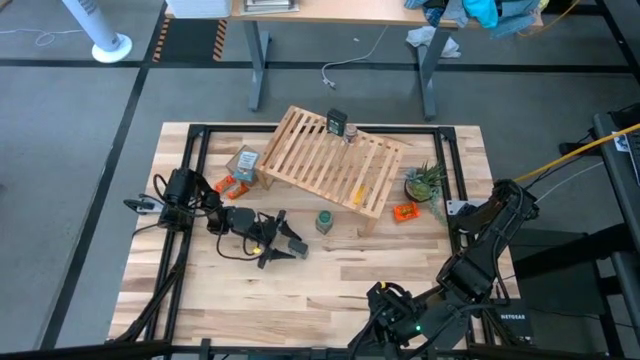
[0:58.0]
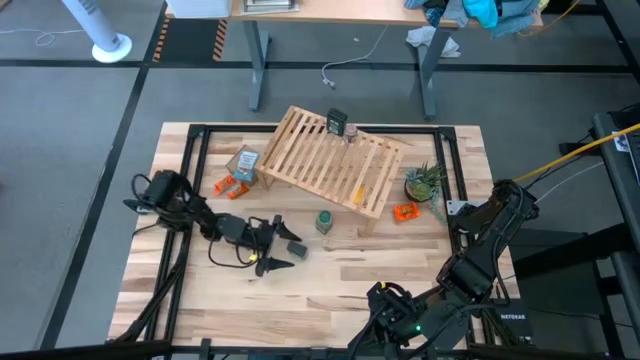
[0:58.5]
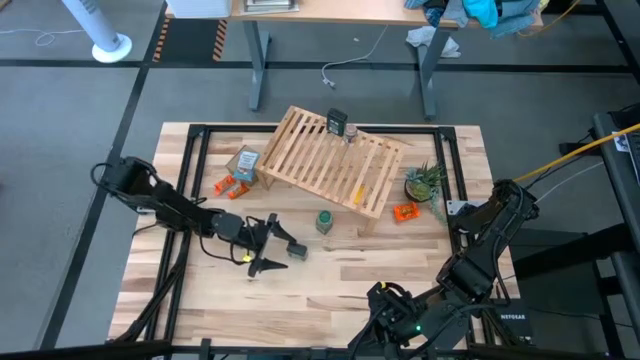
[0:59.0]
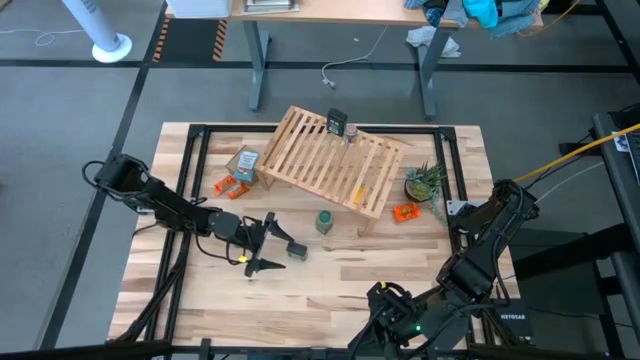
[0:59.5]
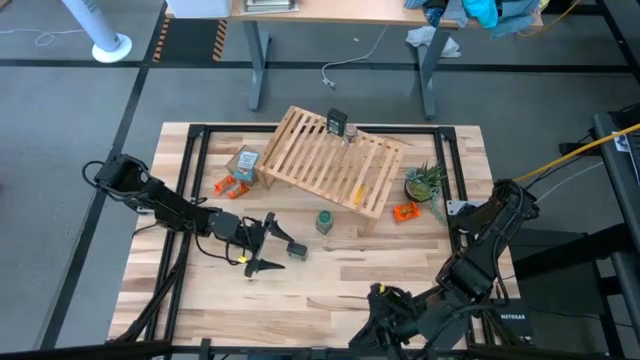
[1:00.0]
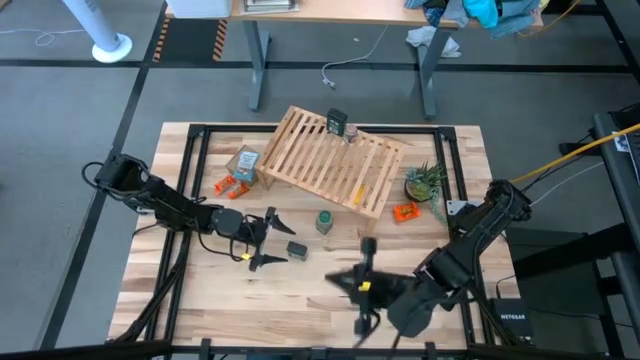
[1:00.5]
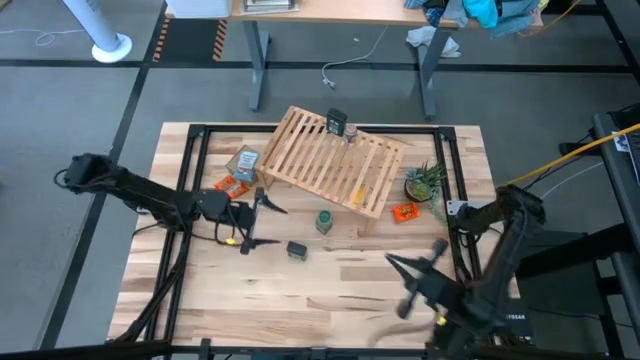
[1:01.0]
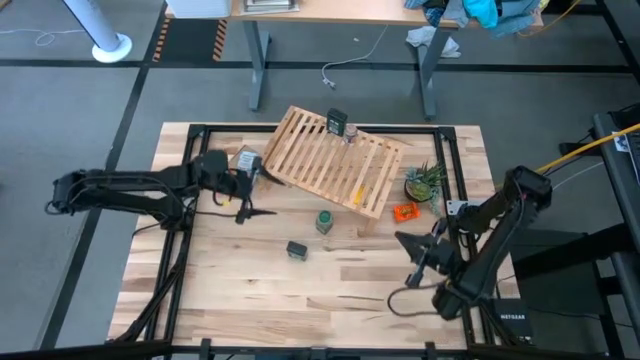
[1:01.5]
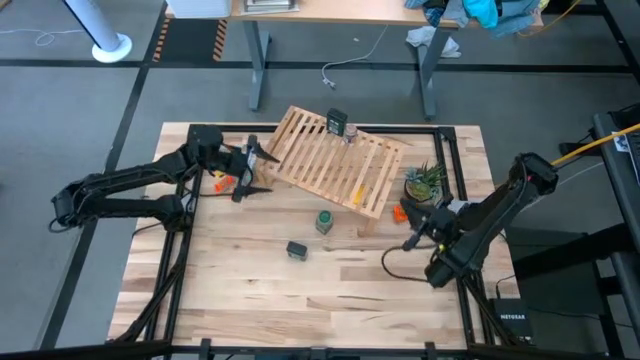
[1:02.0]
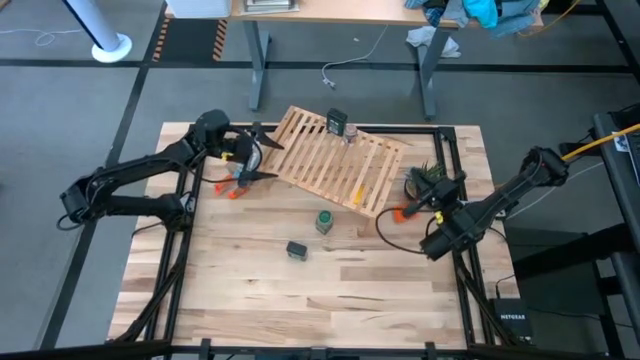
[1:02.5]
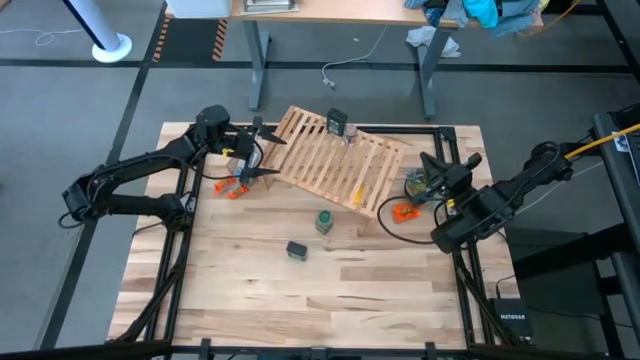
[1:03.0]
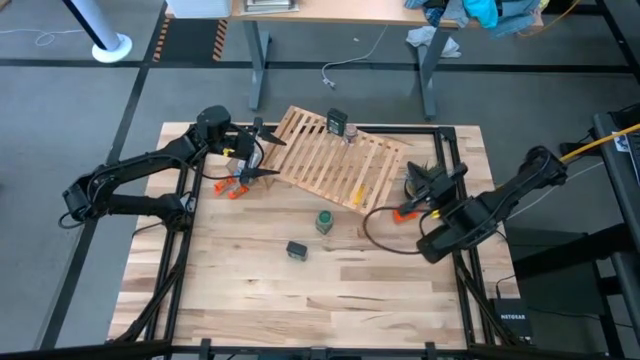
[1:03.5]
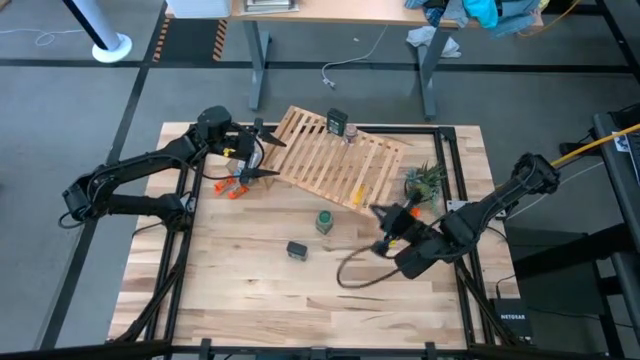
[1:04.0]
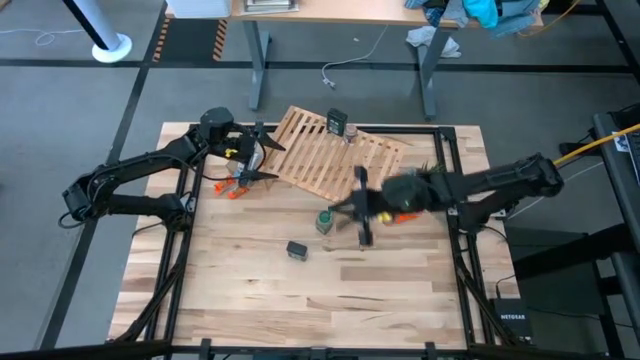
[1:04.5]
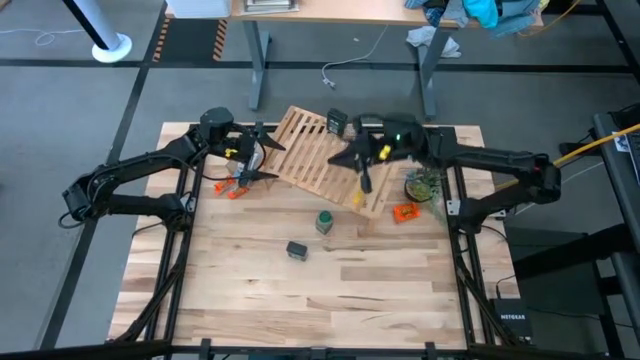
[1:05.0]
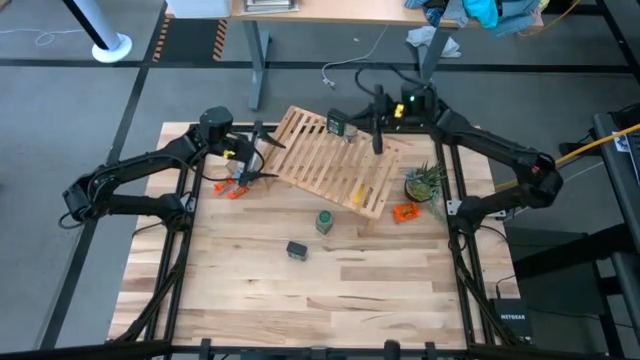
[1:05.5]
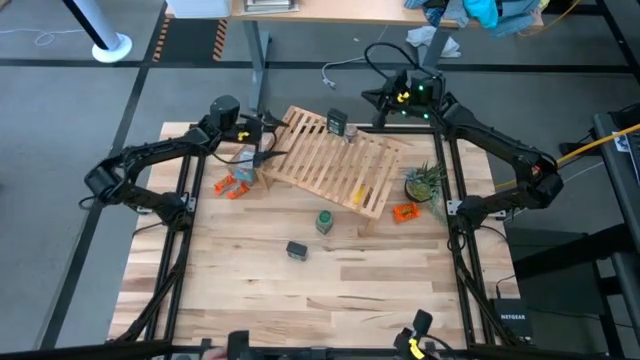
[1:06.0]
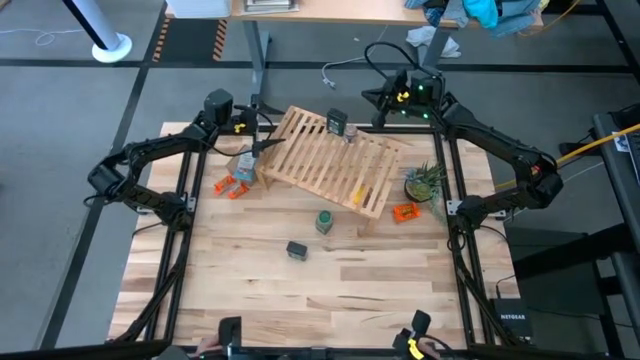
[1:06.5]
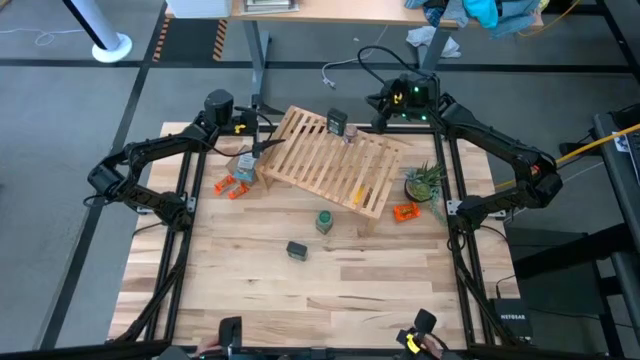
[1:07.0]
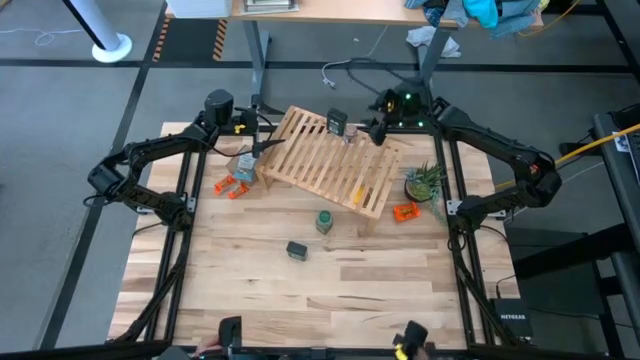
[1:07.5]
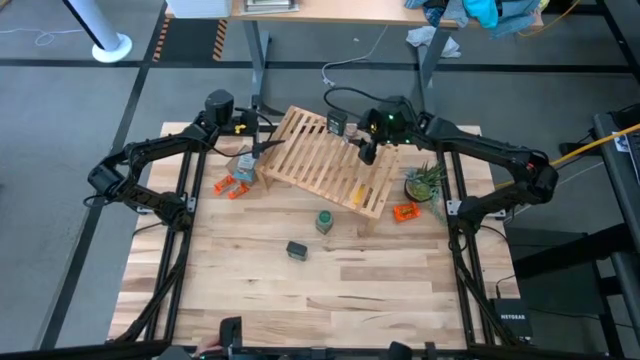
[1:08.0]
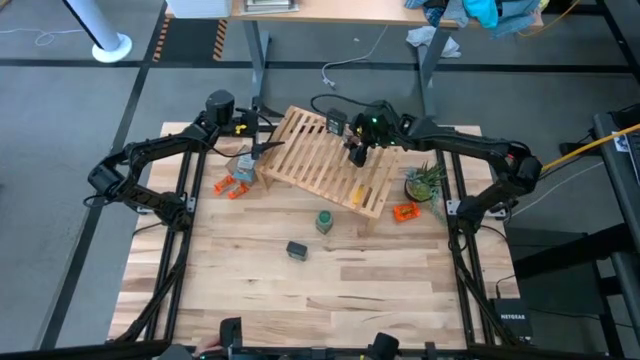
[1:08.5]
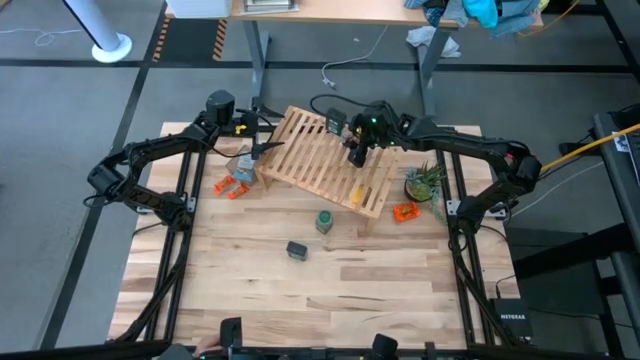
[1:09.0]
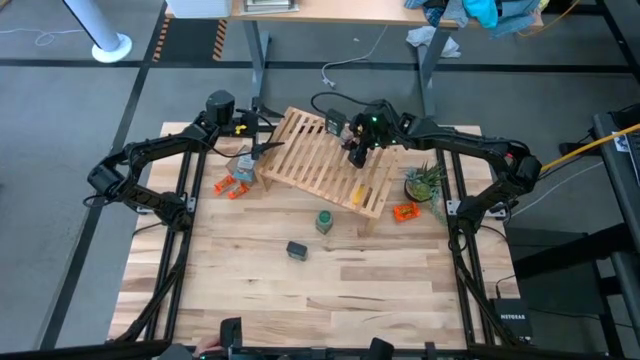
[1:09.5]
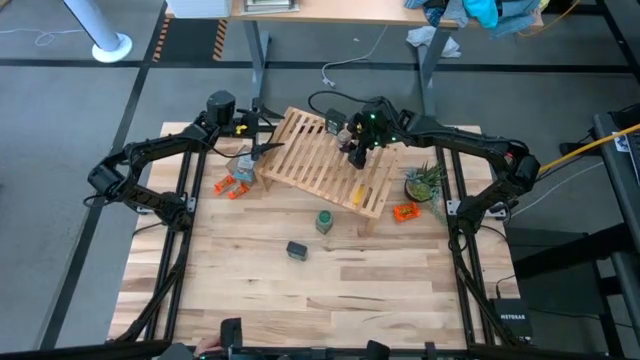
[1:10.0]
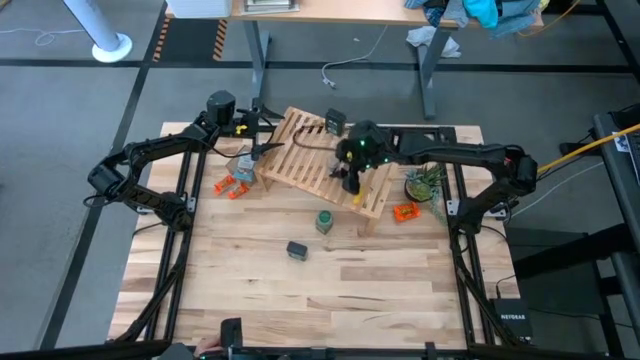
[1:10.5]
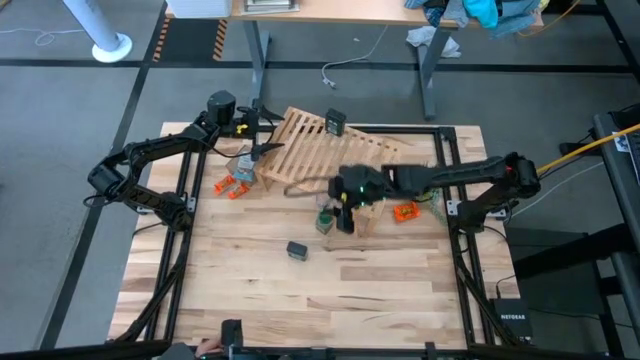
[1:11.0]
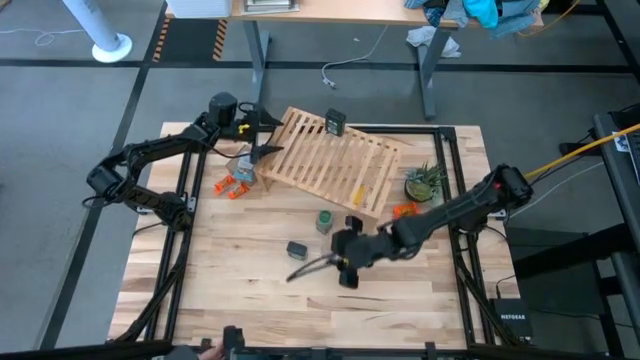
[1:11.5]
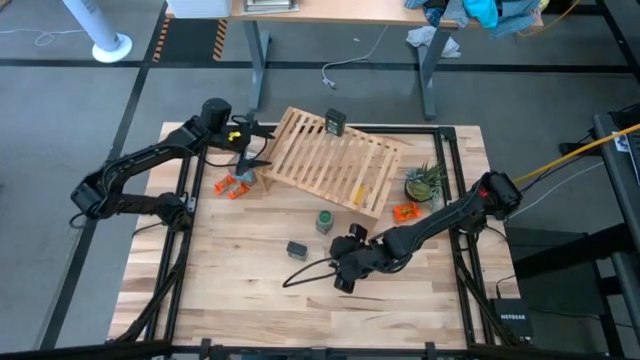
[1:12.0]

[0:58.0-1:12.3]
Task: Shelf spices
Remove the transparent seasoning bottle from the shelf

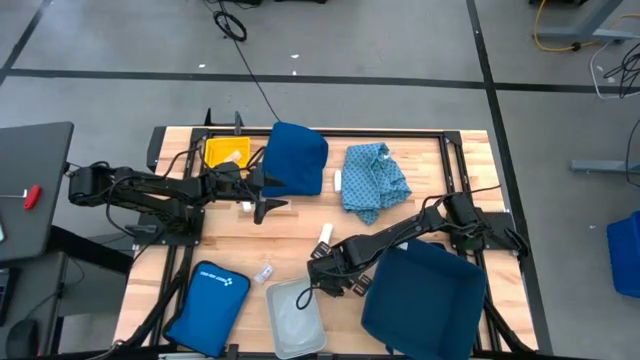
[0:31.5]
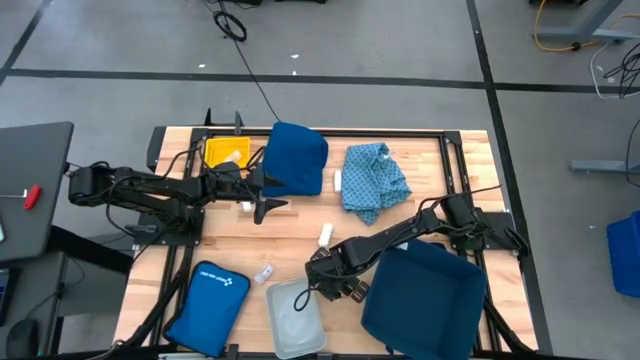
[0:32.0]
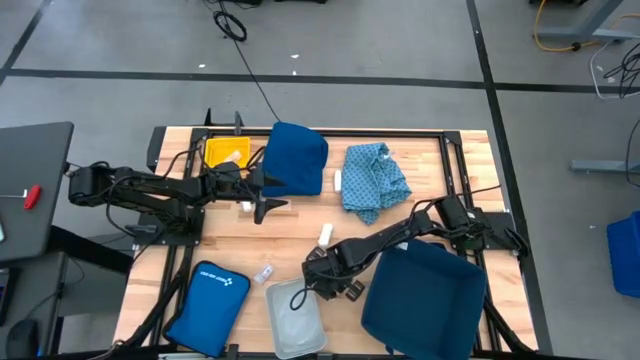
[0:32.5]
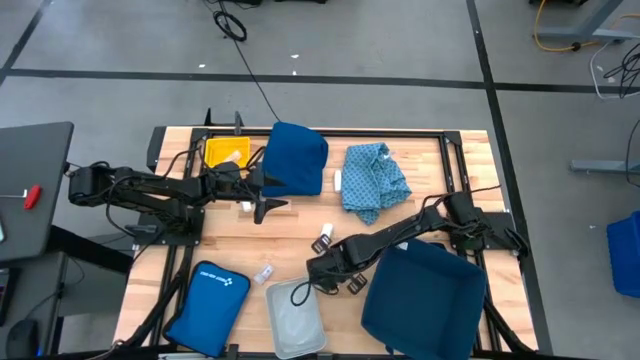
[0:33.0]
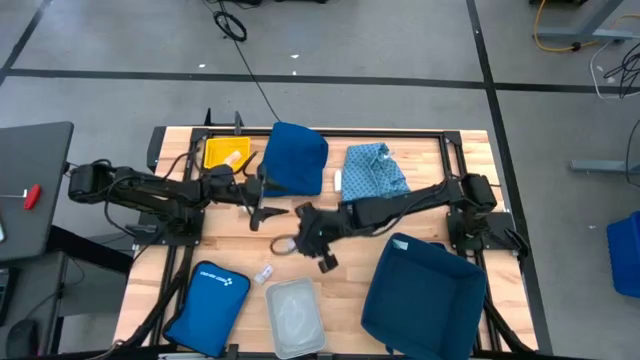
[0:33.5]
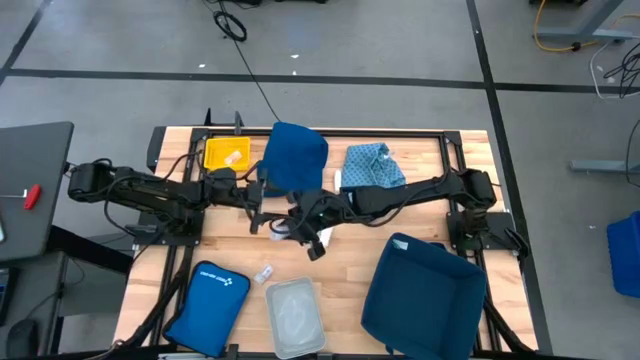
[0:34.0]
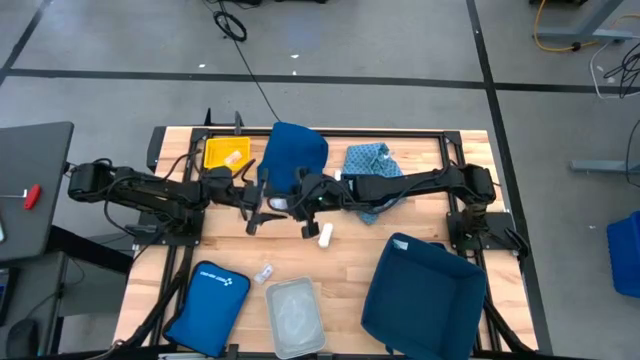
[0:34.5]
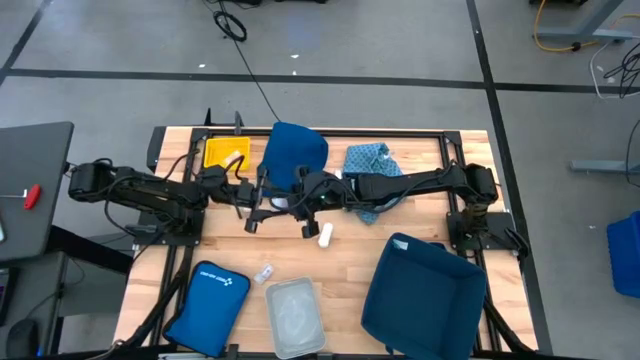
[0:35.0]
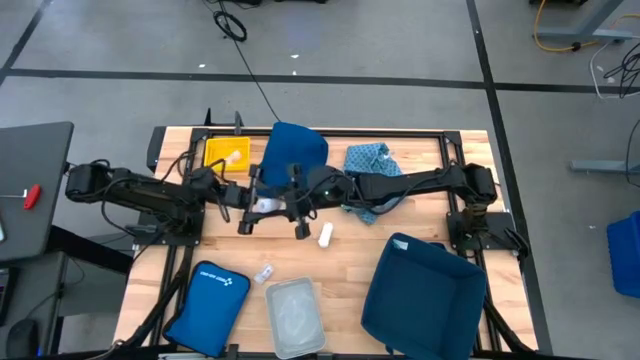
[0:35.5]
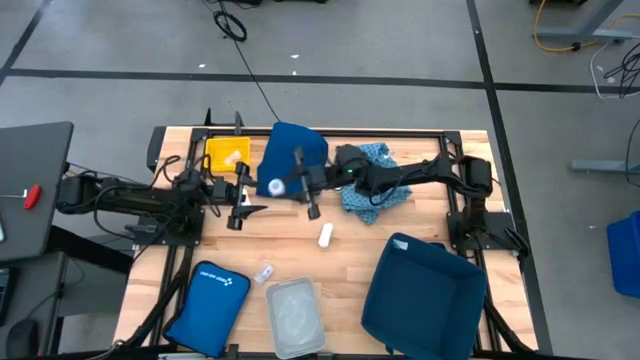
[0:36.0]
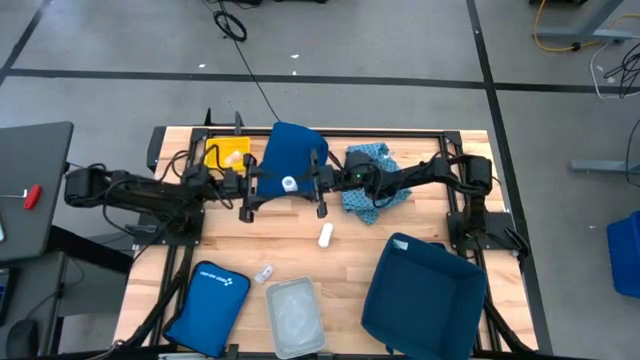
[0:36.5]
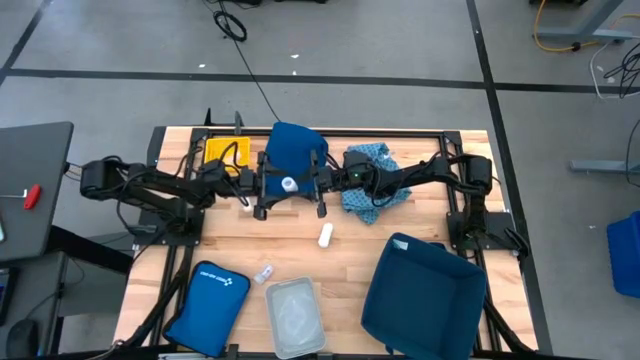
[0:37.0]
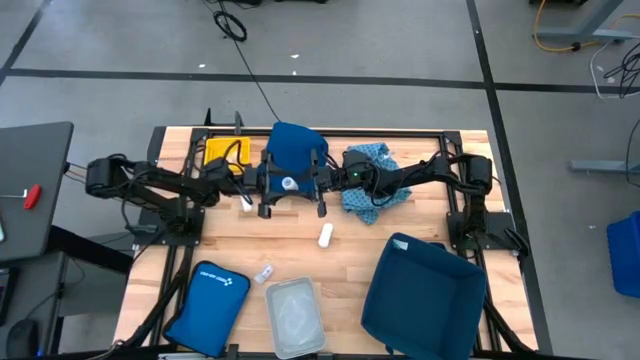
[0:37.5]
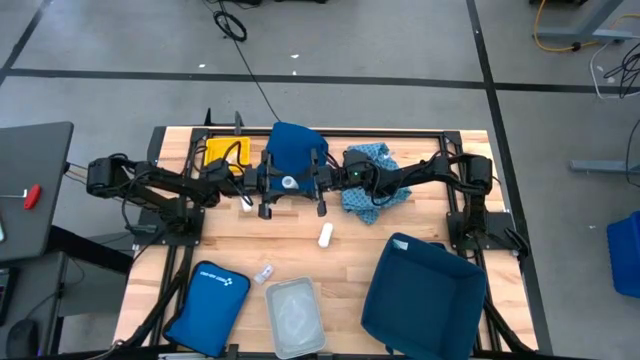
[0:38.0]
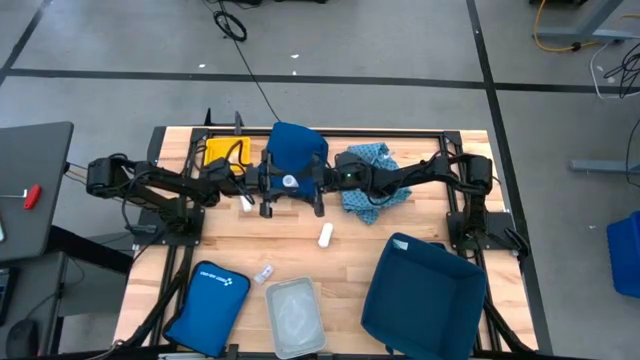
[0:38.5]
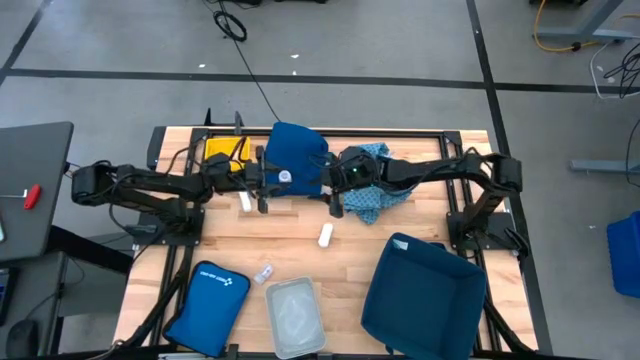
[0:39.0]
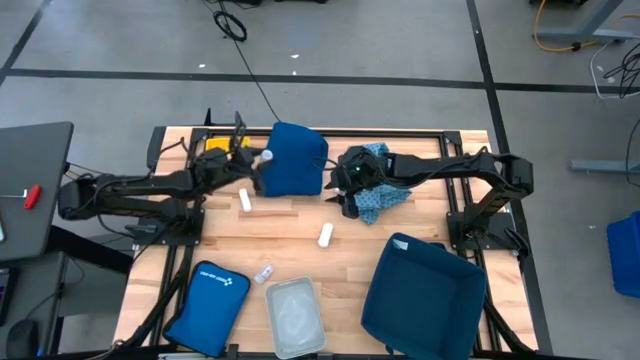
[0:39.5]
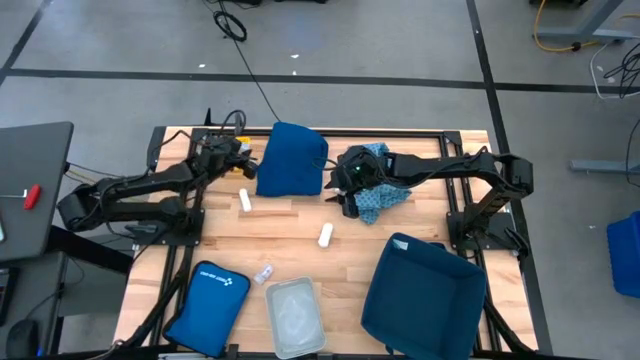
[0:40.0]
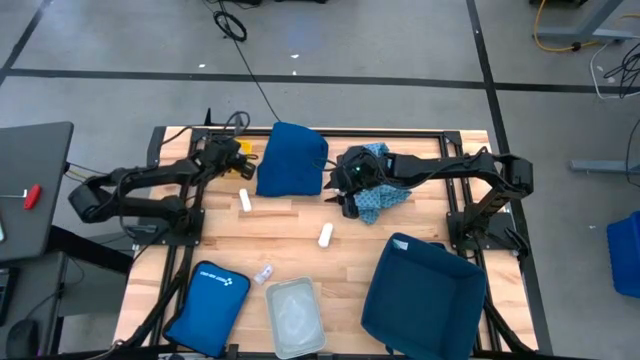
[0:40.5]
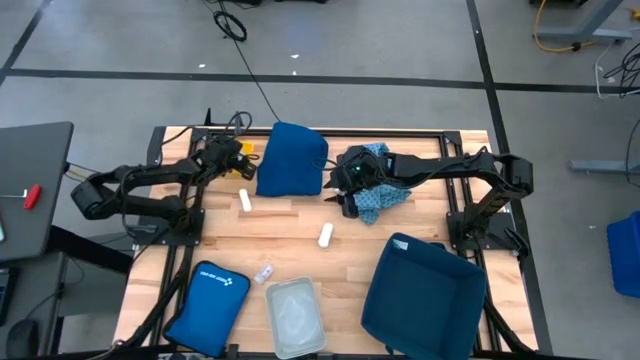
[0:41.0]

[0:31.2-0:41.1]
Task: Pick & place medical supplies in basket/bin
Put the right white pill bottle into the yellow bin
